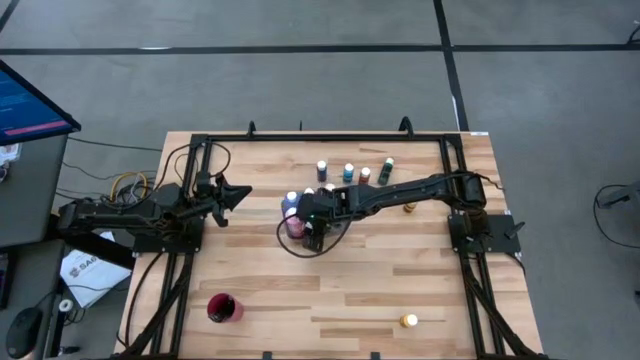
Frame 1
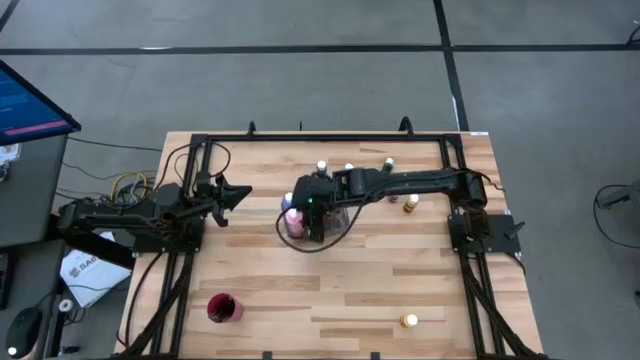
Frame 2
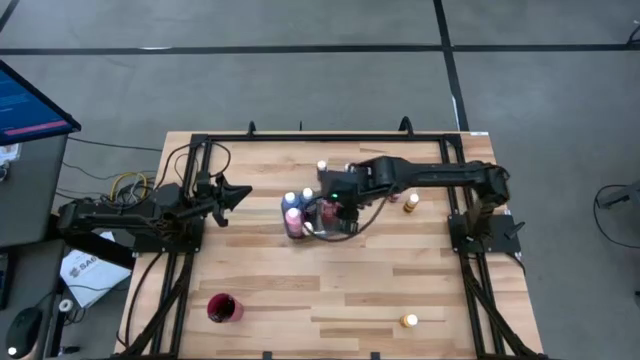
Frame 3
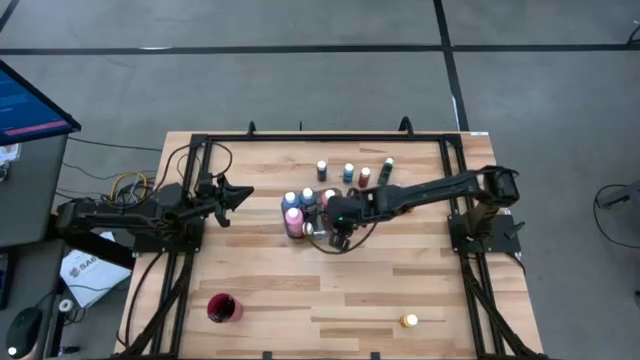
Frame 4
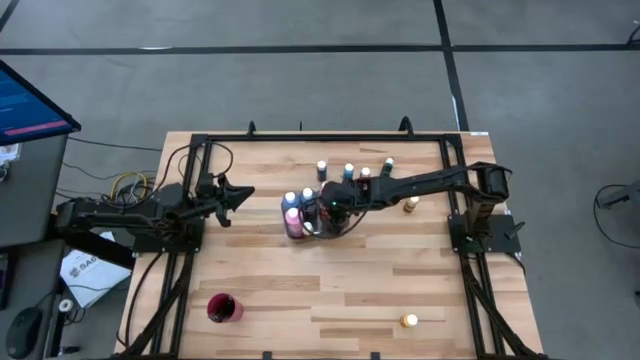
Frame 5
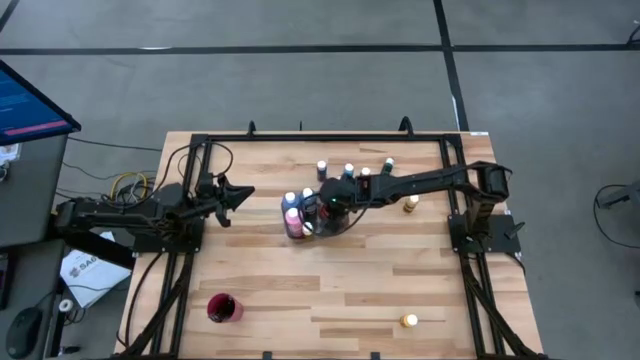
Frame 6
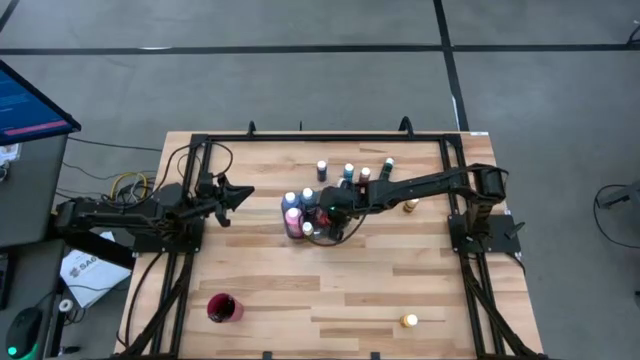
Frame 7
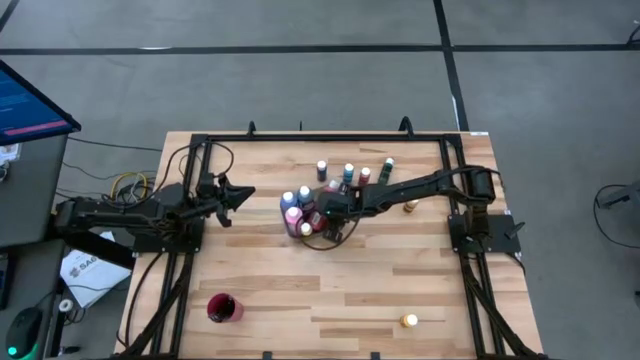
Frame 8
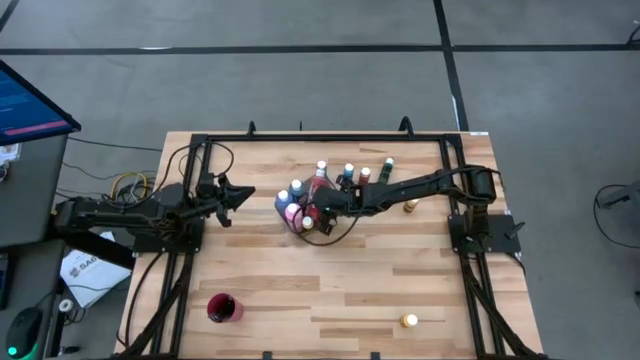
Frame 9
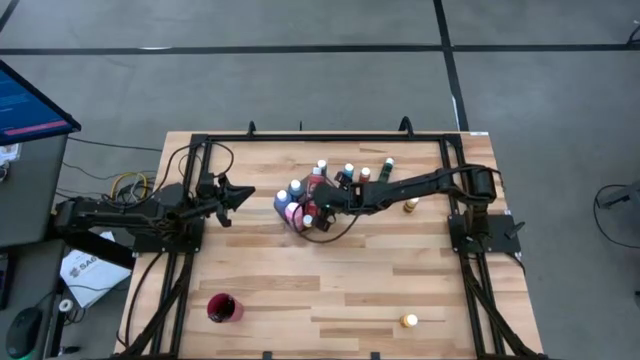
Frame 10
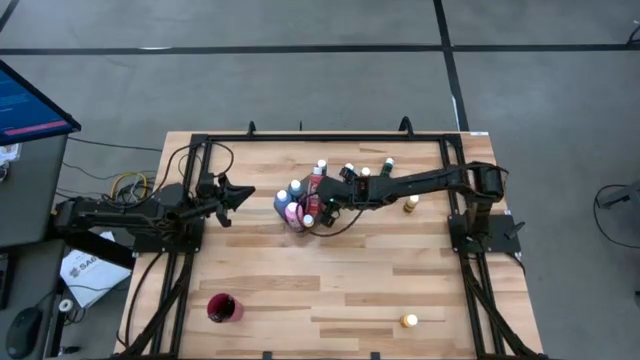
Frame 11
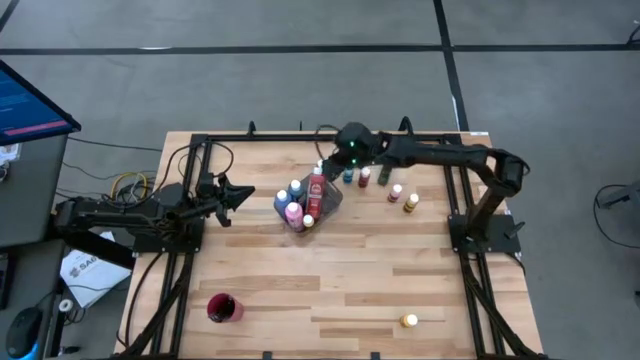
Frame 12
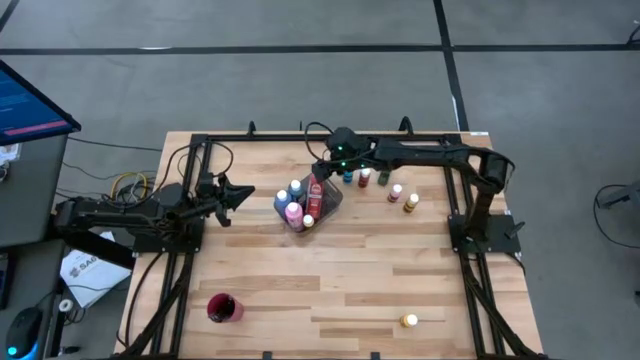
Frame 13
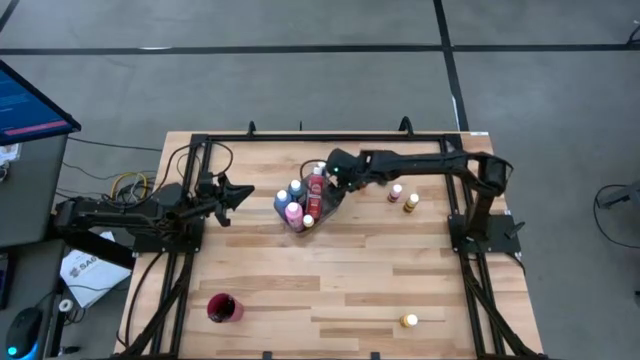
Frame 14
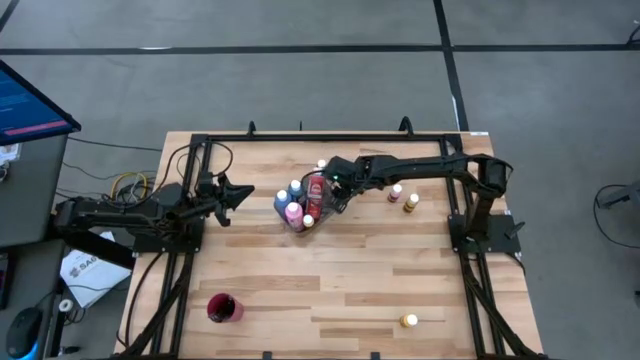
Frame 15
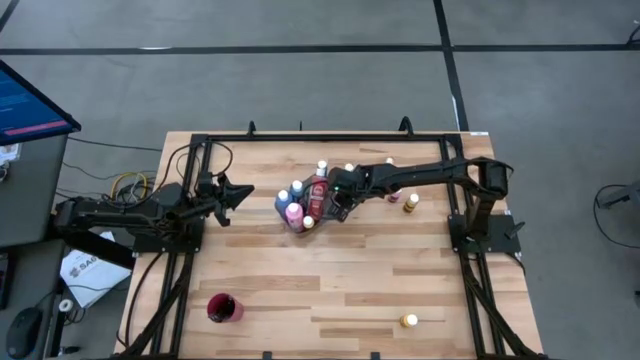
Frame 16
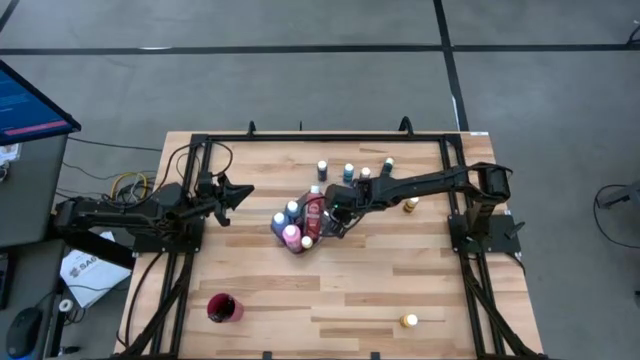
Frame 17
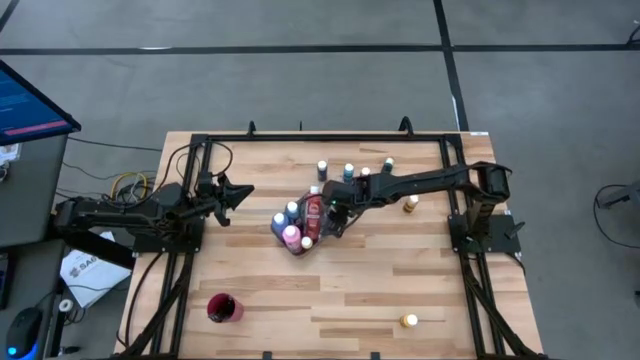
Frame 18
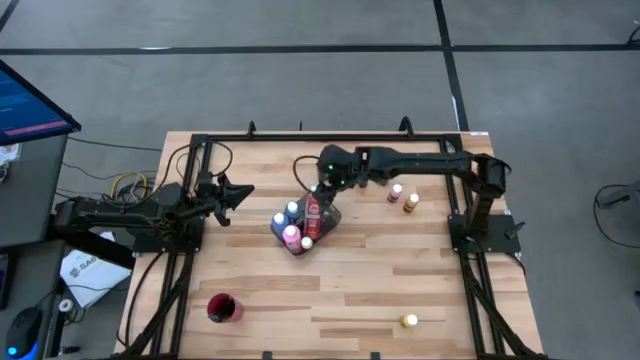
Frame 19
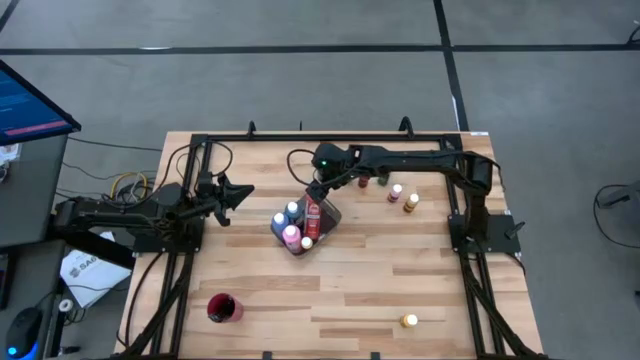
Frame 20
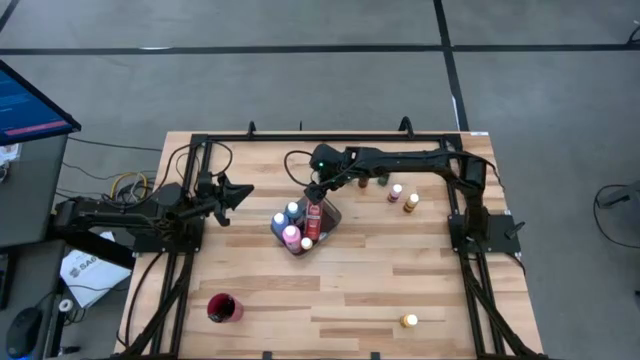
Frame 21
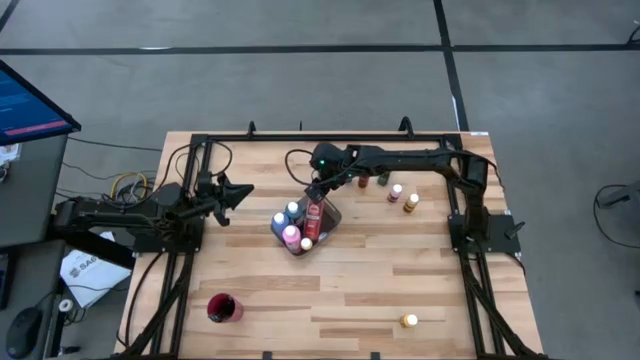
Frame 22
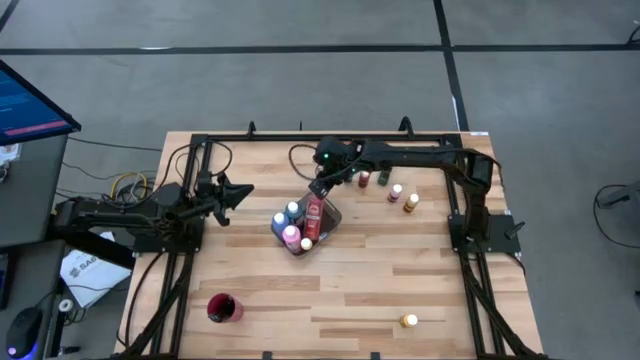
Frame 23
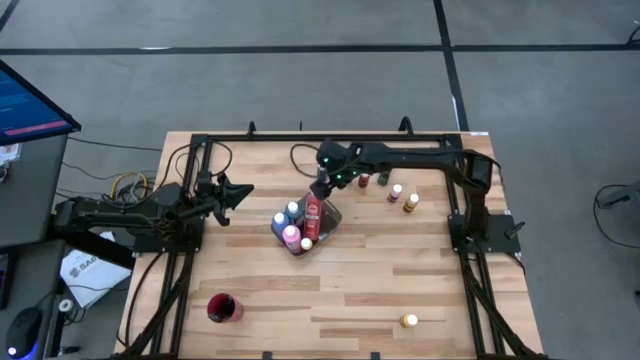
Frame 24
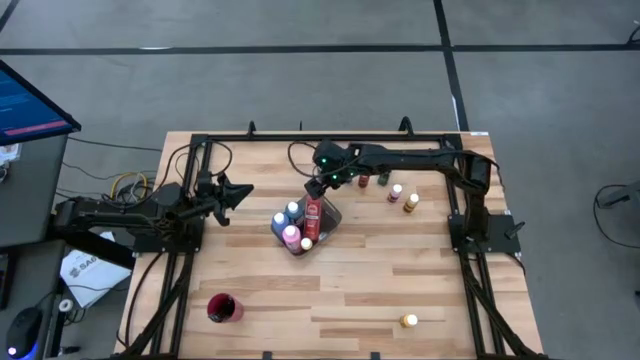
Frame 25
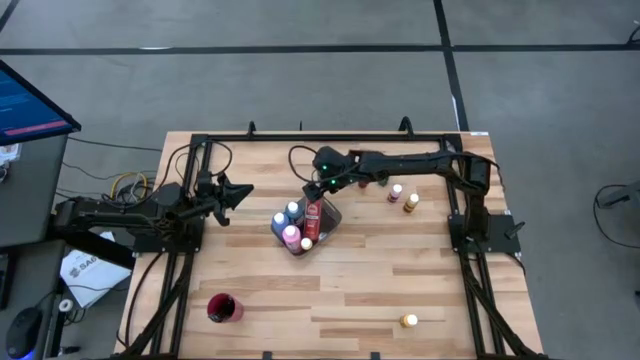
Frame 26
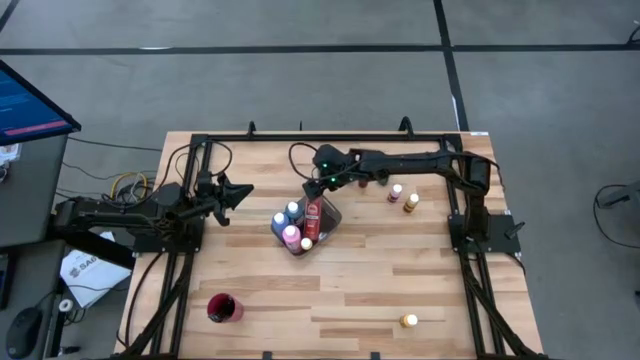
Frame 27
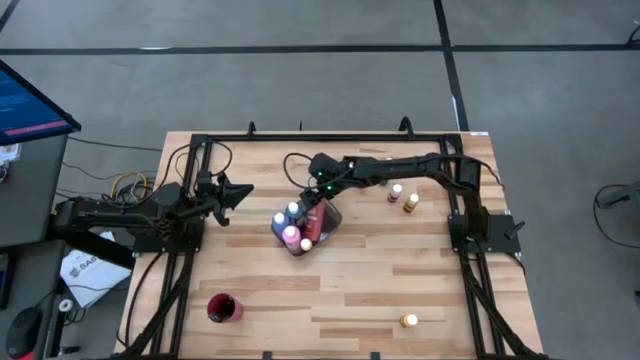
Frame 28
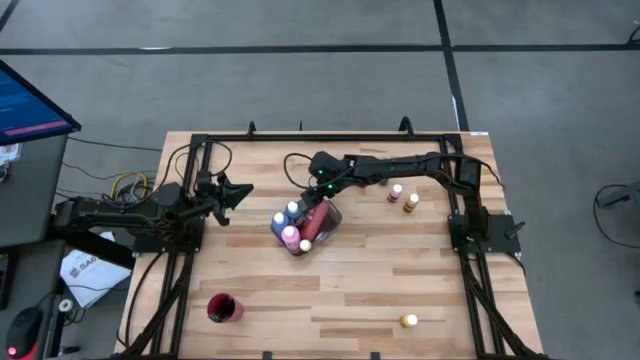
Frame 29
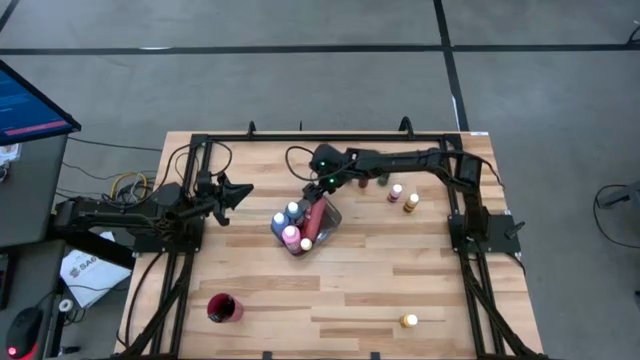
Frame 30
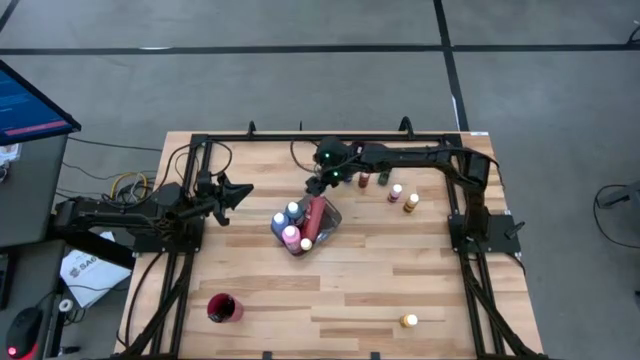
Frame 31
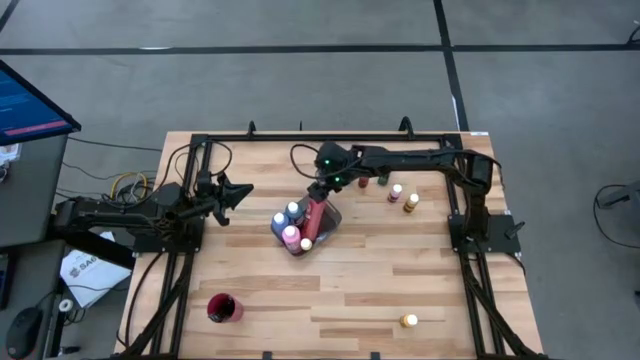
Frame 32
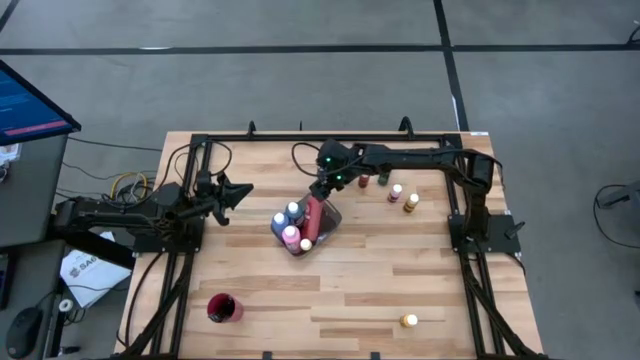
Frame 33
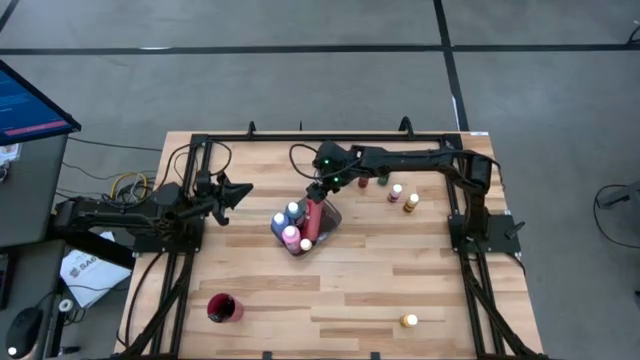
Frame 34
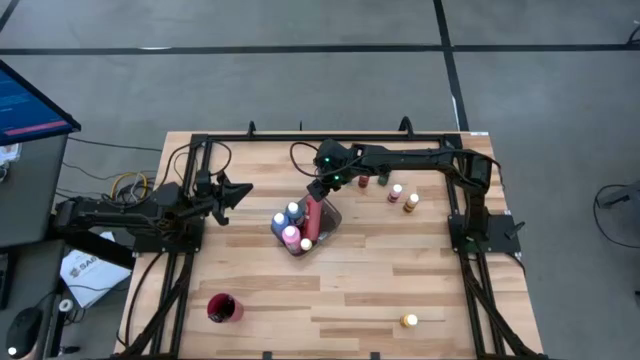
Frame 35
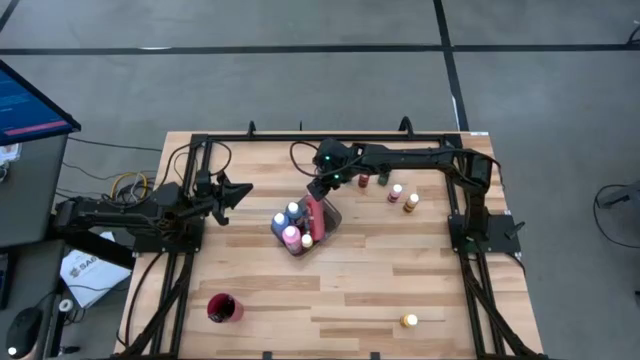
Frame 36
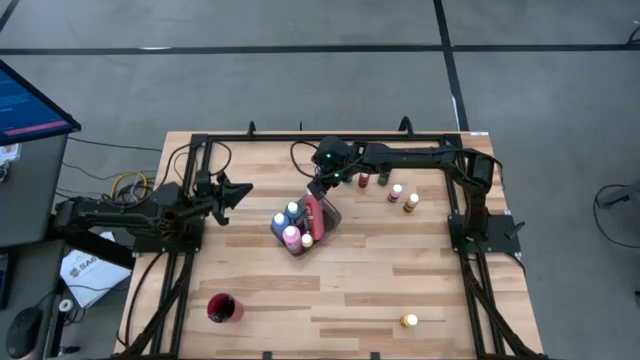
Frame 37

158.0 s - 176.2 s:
Task: Pick & Place Paint Supplies
Adjust the large pink paint bottle in the black bin

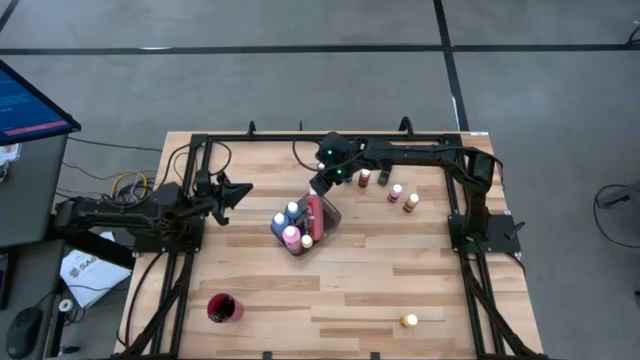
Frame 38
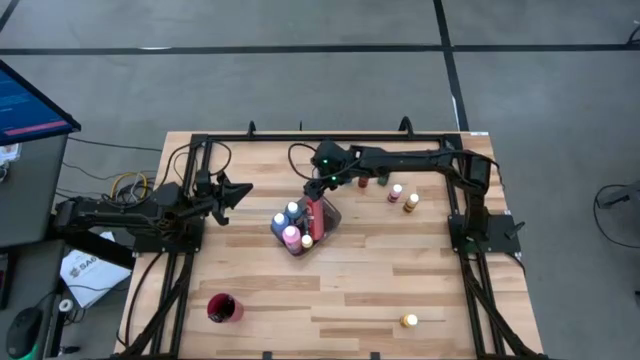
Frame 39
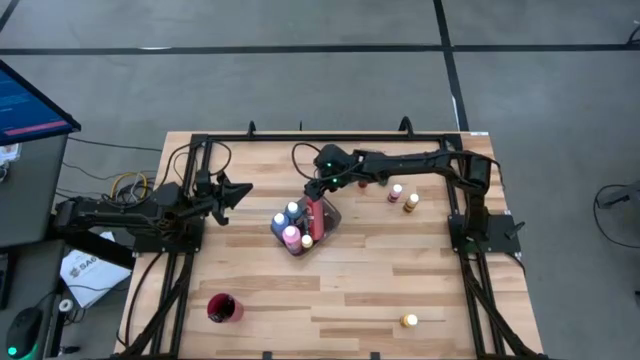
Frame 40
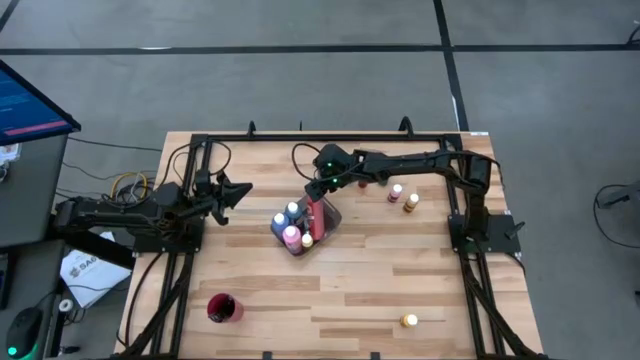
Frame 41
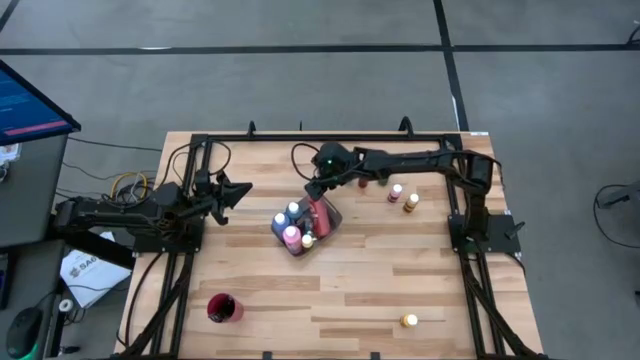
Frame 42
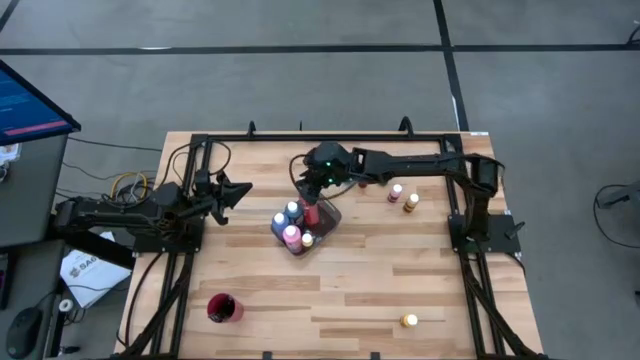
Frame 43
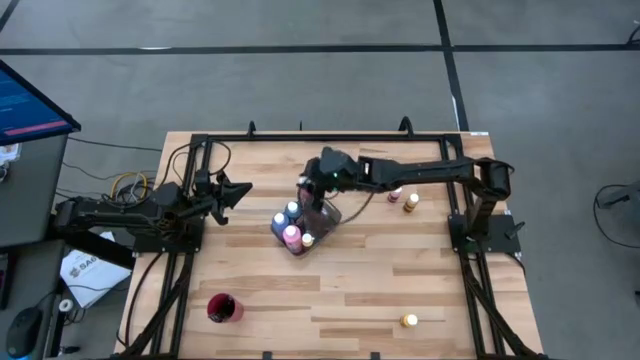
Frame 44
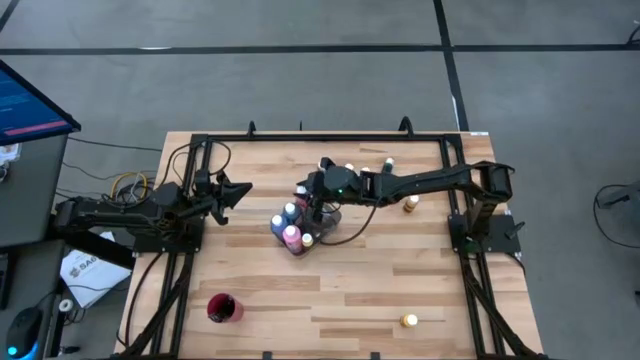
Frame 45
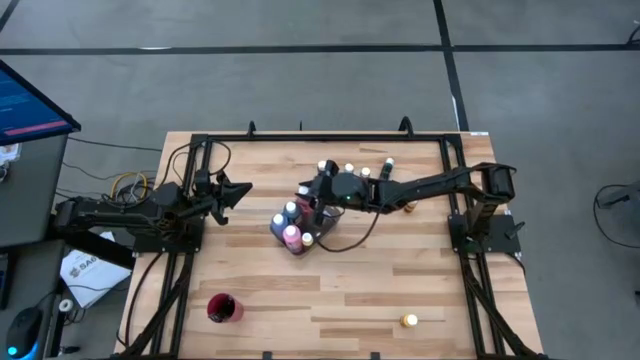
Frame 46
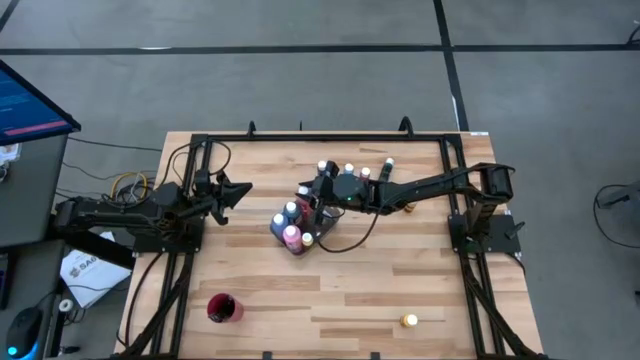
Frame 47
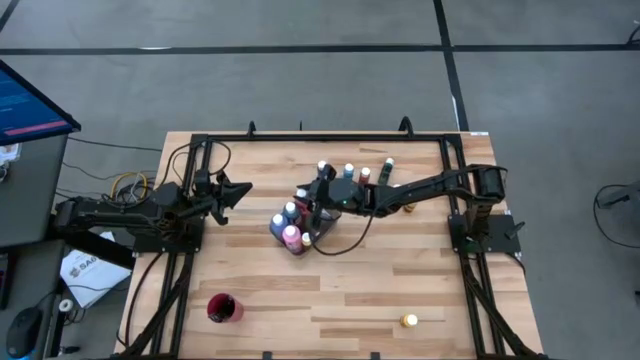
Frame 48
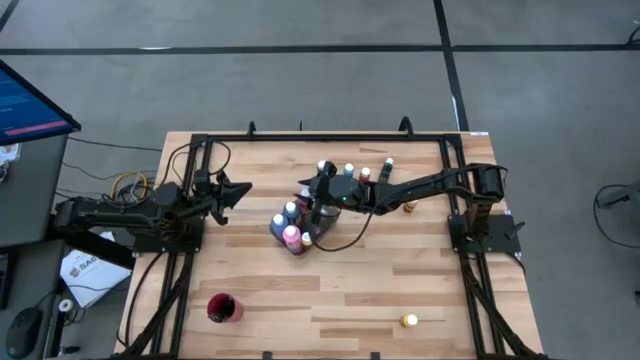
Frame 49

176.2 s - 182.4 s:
Adjust the large pink paint bottle in the black bin
